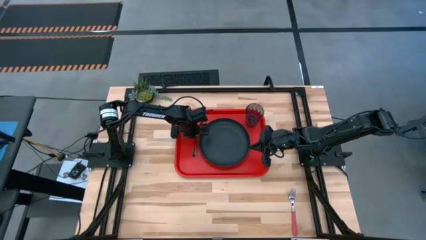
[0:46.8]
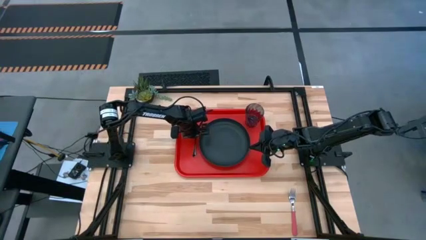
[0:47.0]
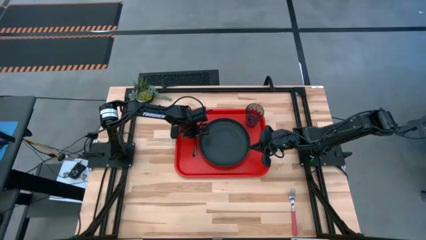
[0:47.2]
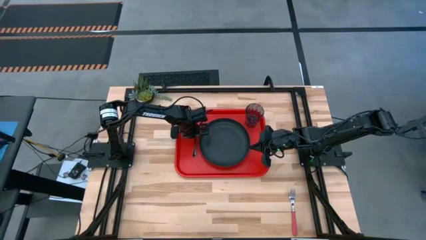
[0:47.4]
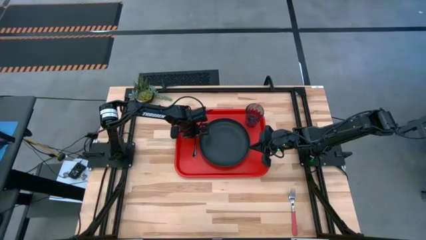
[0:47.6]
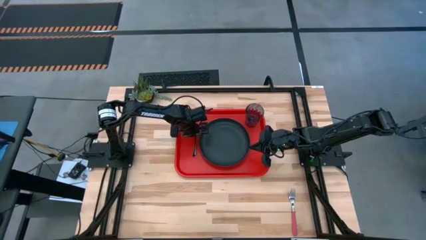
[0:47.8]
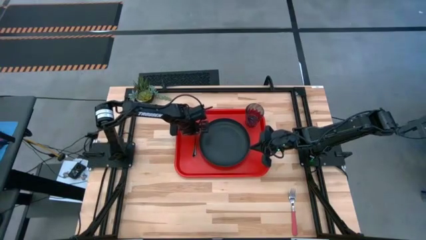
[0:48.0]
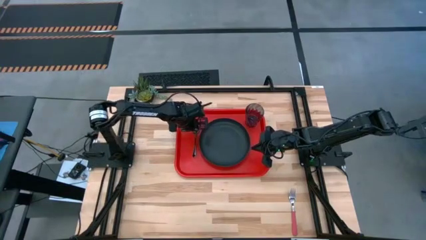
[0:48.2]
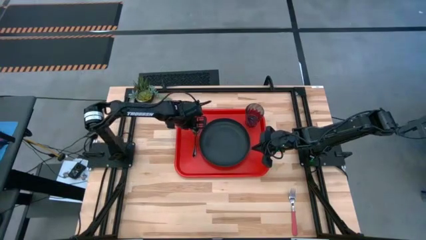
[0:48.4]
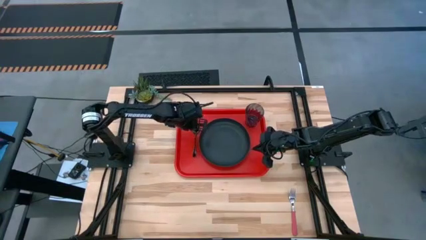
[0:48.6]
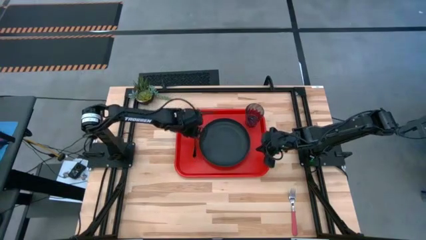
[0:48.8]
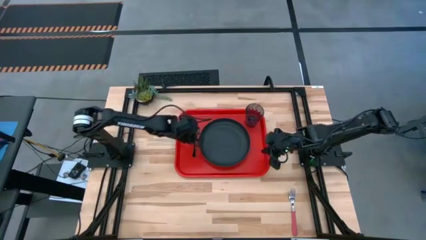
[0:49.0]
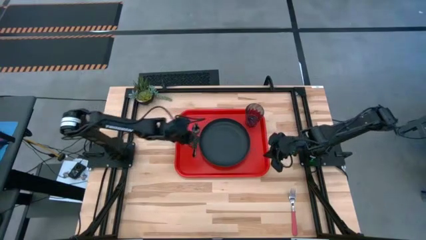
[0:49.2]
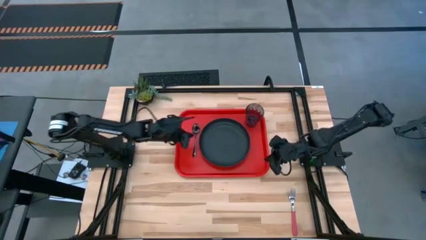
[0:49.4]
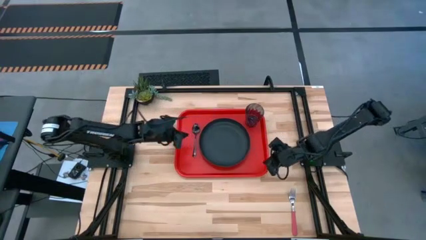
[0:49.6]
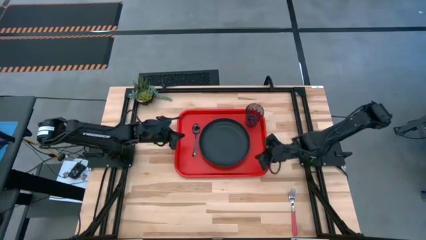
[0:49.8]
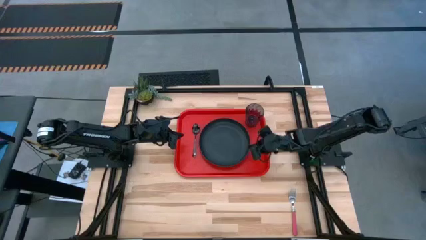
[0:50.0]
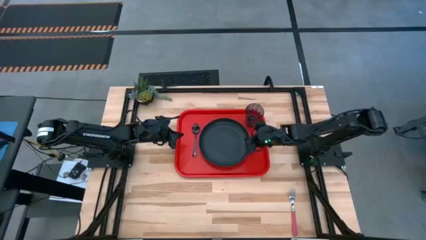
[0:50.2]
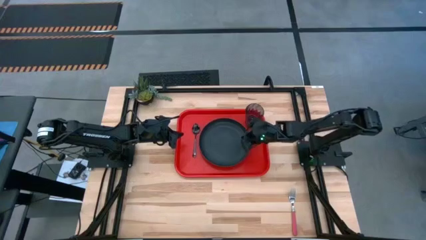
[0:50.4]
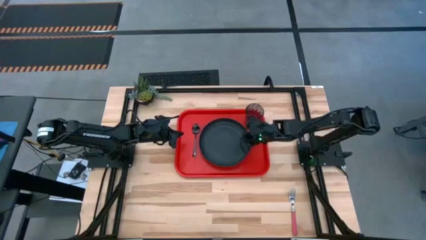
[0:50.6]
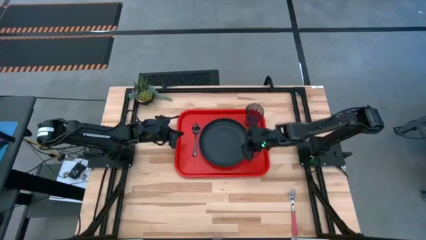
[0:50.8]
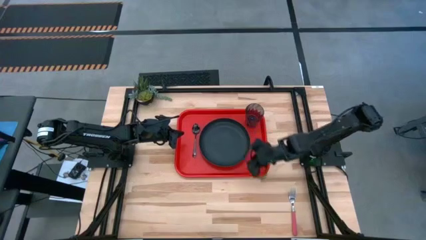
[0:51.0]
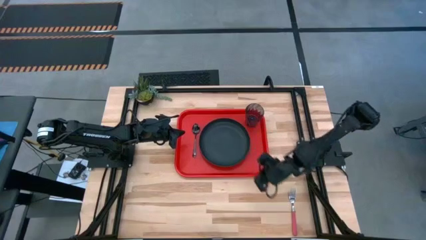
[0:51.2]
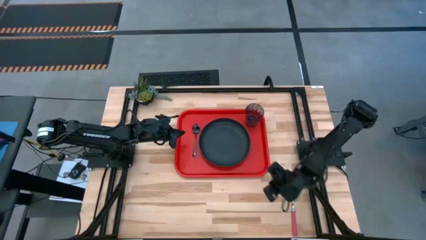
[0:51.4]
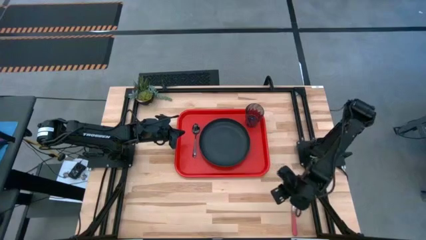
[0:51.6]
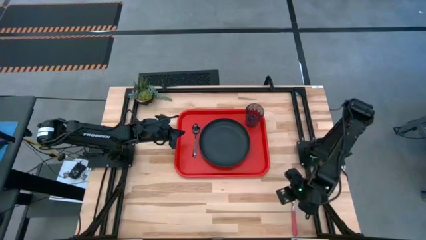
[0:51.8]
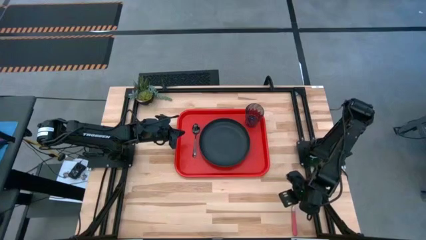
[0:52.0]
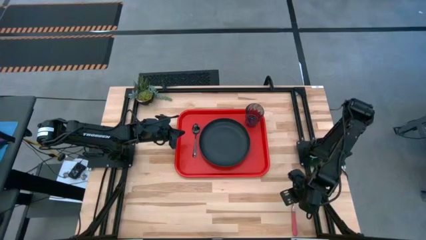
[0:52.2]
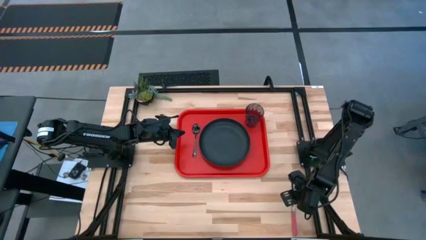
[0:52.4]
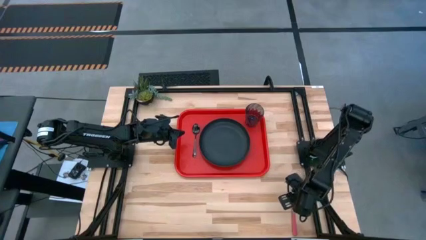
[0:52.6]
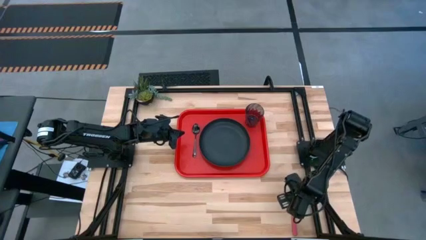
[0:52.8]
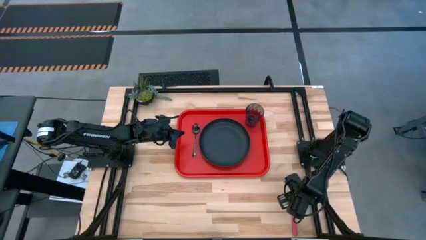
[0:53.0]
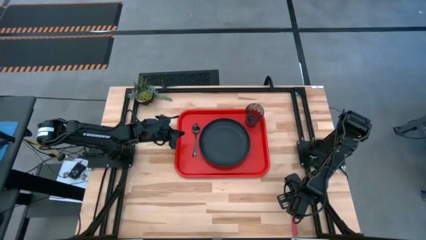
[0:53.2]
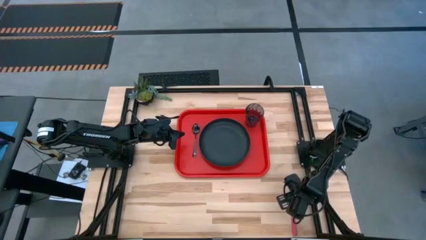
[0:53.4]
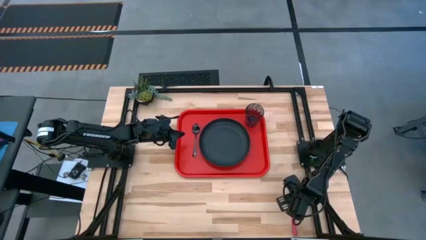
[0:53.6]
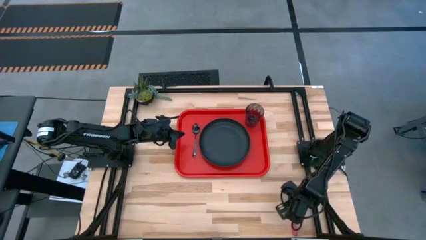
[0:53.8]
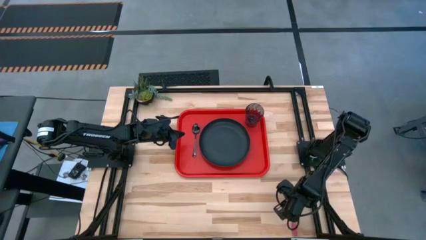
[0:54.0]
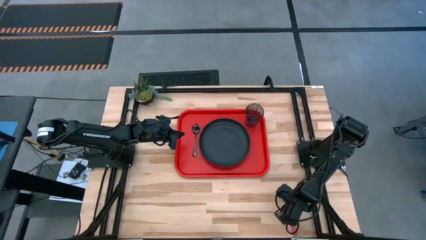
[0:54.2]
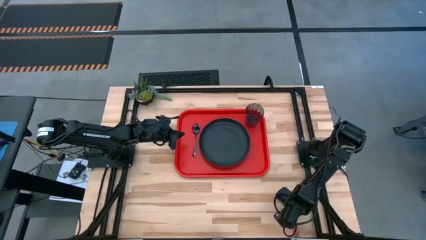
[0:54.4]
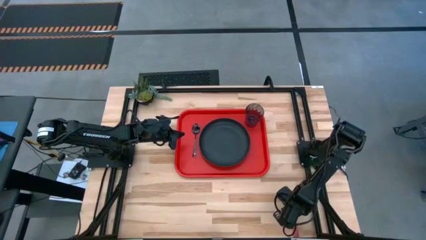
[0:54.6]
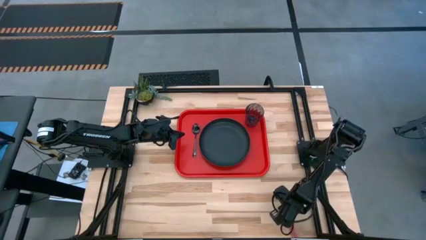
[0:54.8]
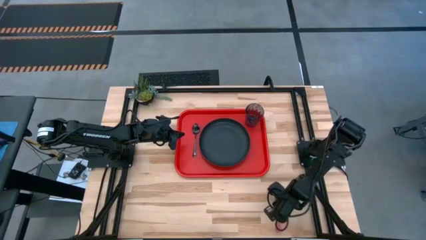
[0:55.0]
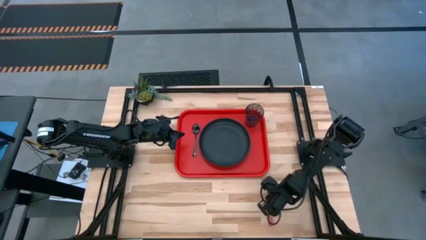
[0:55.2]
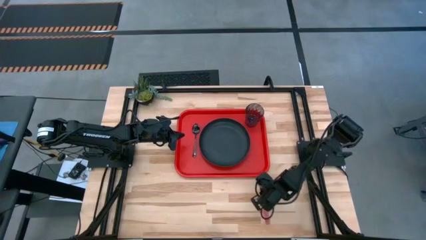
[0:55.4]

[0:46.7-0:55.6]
Task: Pick and place plate/cup/fork/spoon on tray
Put the red fork on the red serving tray to the left of the black spoon

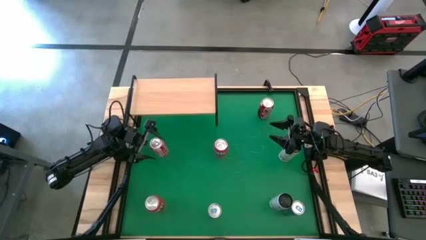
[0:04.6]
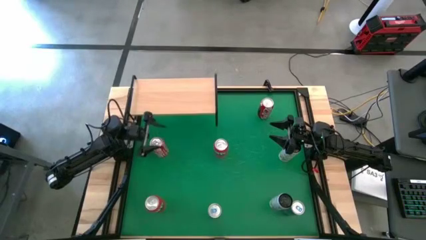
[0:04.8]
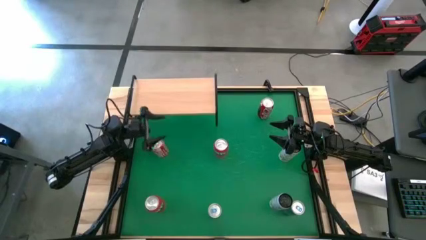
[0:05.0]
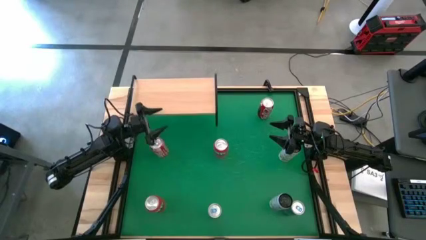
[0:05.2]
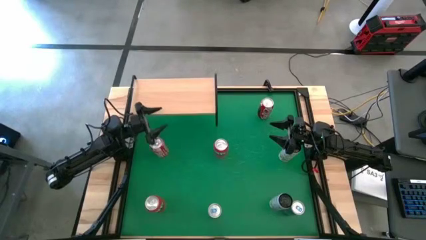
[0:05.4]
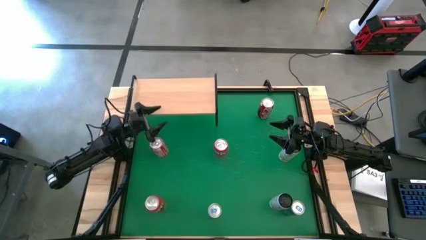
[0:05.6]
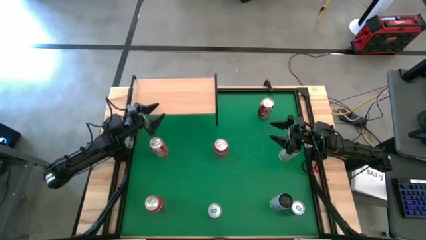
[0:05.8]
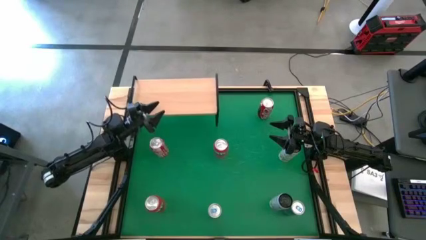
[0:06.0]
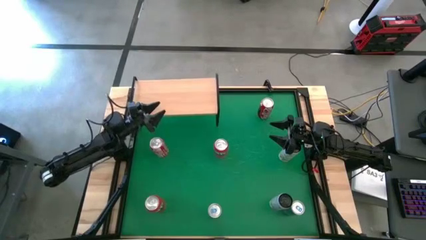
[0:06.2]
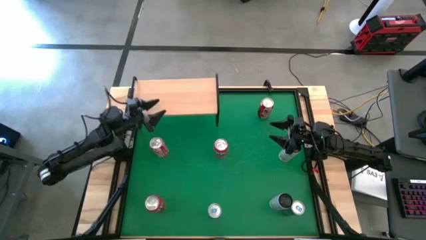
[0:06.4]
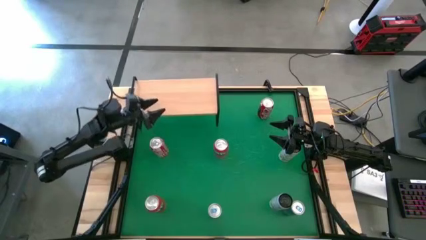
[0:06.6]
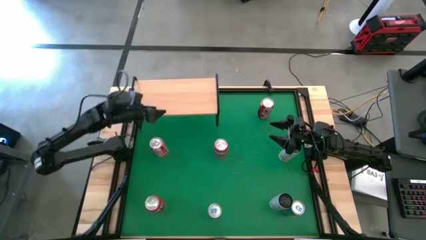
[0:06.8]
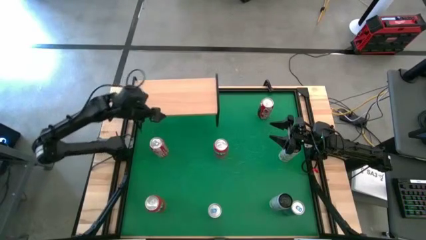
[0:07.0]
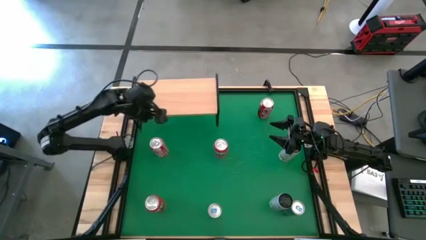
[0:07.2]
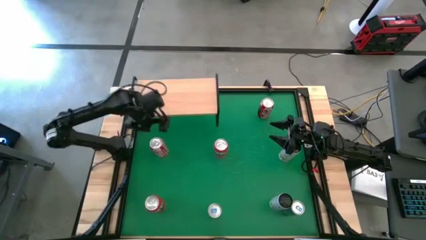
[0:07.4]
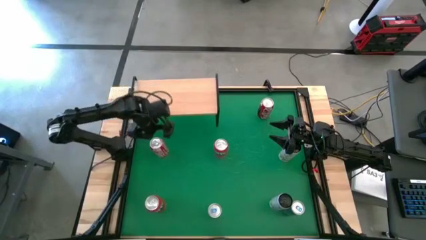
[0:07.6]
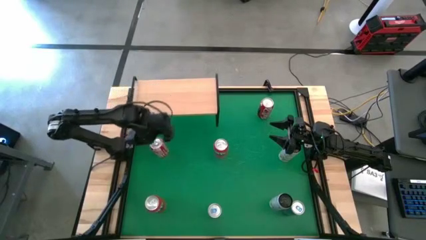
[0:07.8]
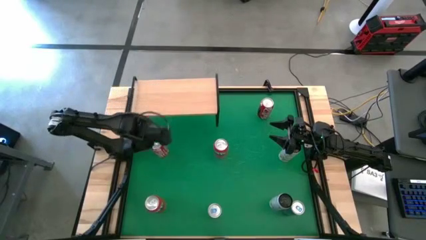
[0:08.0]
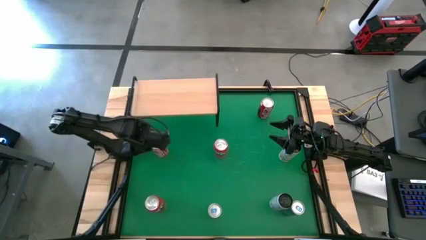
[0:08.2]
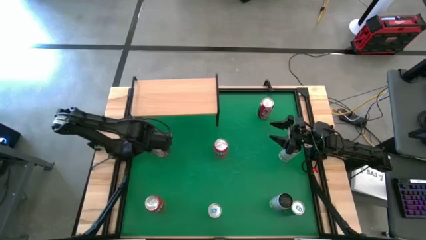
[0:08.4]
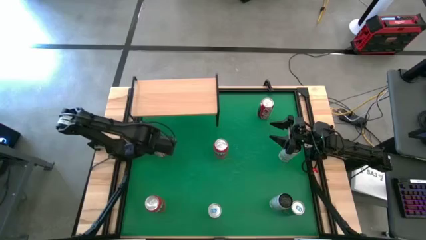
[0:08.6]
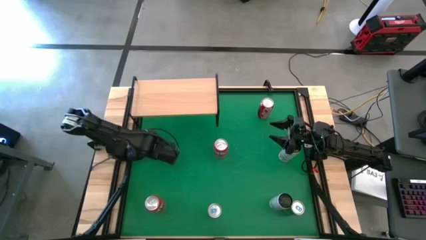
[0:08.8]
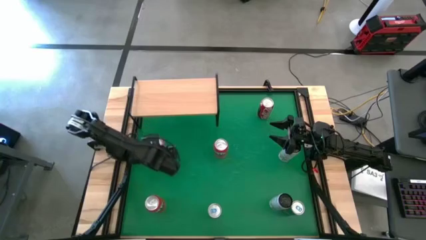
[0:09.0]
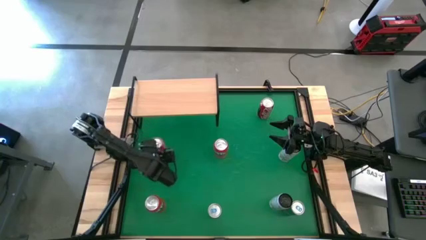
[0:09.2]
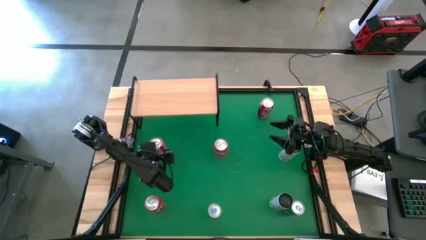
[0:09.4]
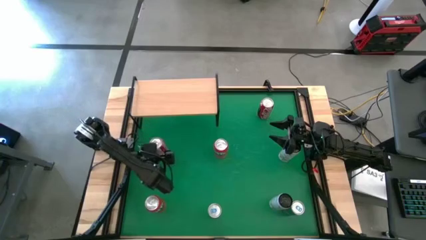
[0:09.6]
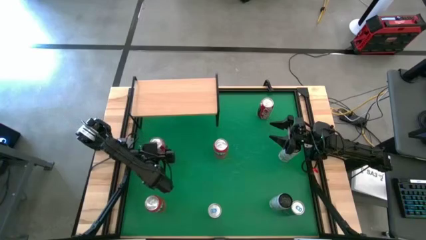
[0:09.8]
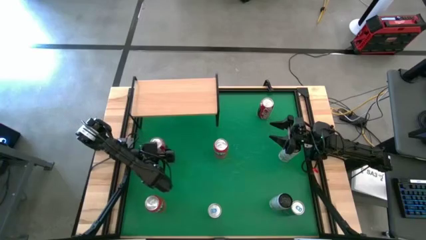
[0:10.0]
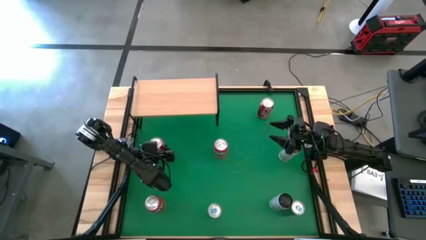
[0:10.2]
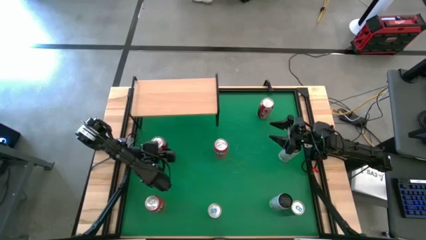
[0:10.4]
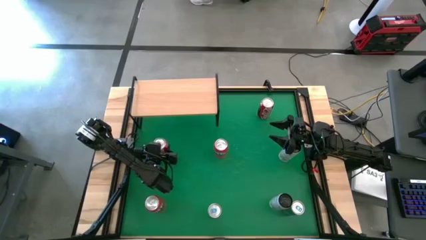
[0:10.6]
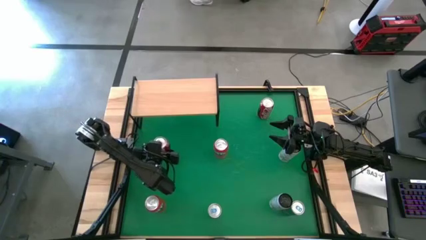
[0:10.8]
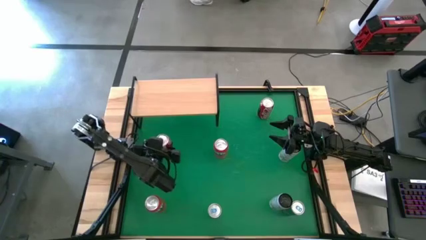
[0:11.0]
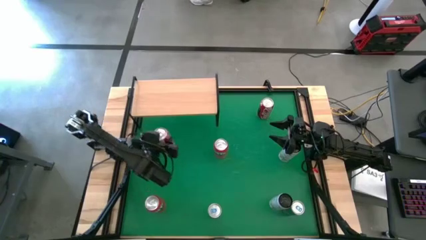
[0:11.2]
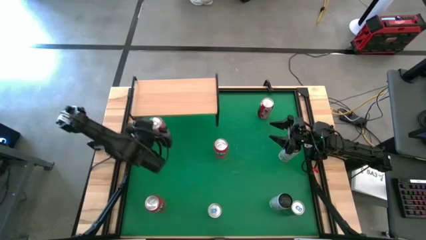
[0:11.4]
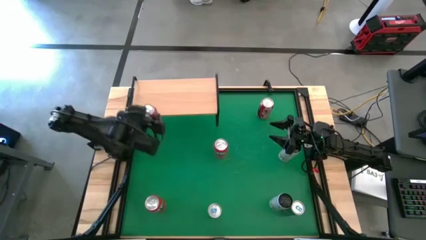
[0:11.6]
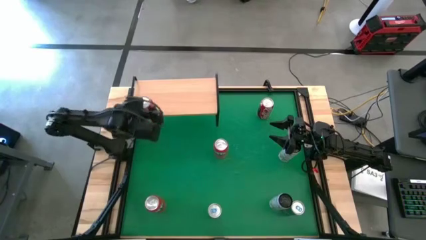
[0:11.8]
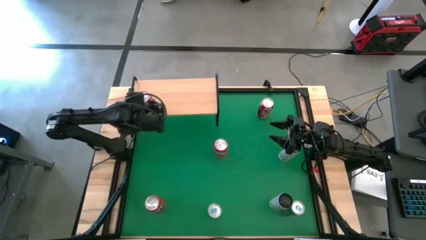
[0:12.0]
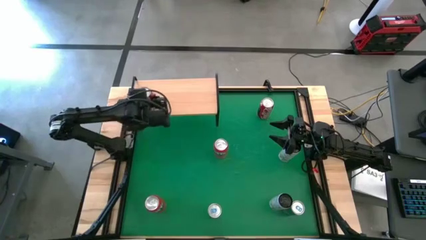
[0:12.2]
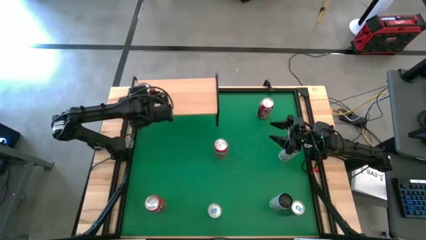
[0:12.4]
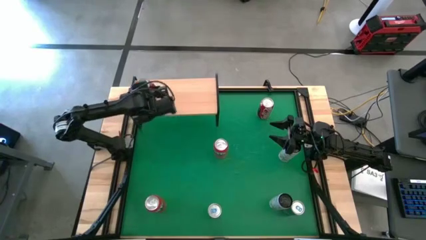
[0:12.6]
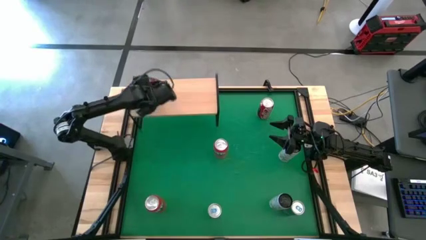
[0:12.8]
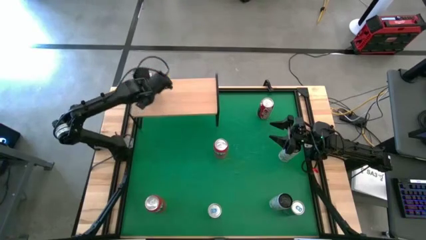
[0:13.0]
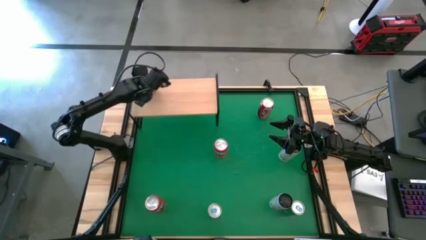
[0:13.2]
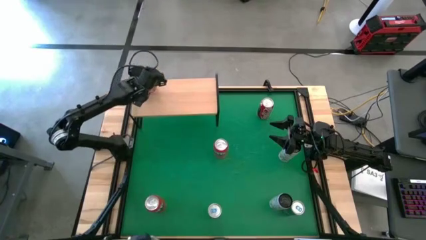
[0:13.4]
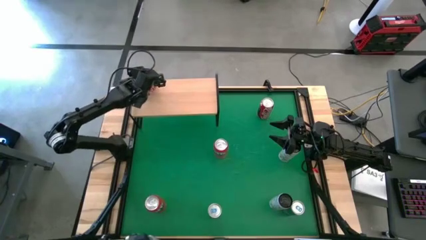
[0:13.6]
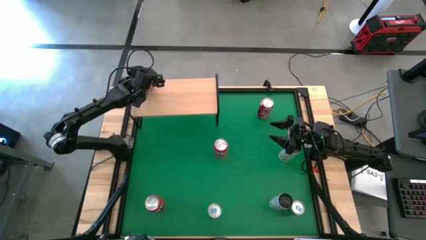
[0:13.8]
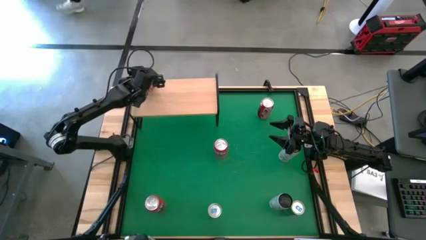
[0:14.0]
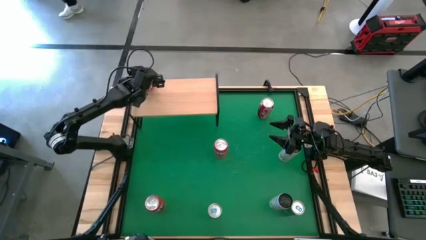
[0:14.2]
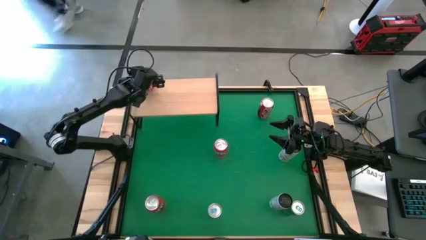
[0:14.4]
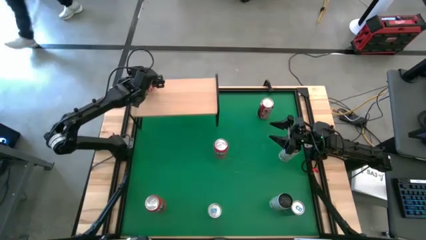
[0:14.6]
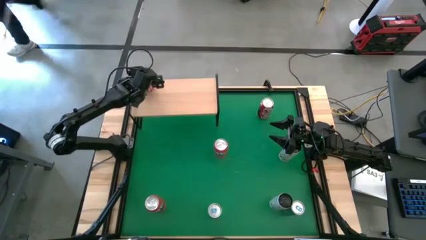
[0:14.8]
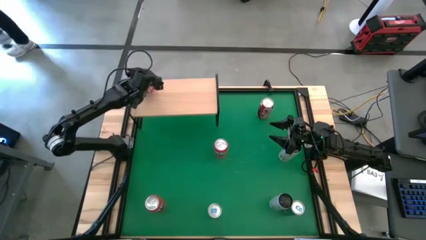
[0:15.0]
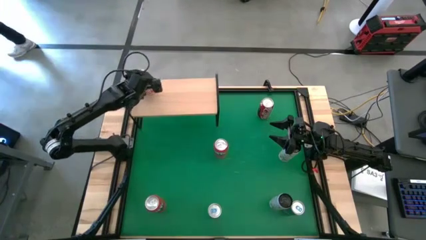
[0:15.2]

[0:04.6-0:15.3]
Task: Place canned beverage on shelf
Put the bottom red white soda can on the shelf
